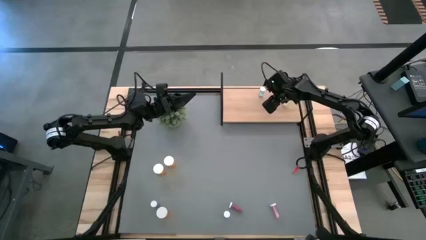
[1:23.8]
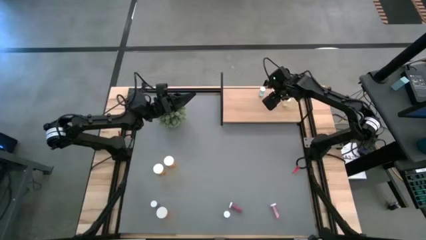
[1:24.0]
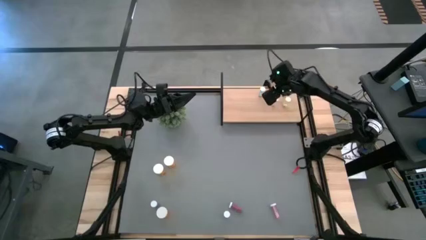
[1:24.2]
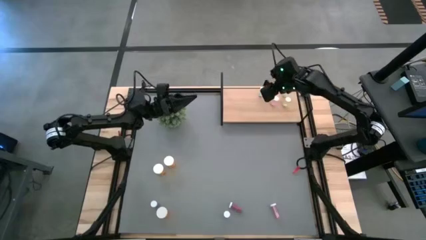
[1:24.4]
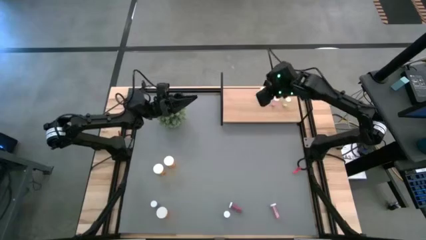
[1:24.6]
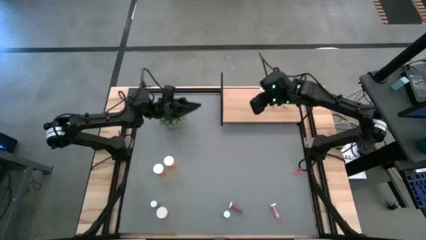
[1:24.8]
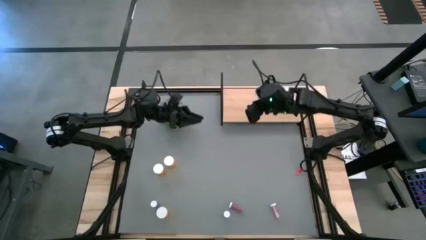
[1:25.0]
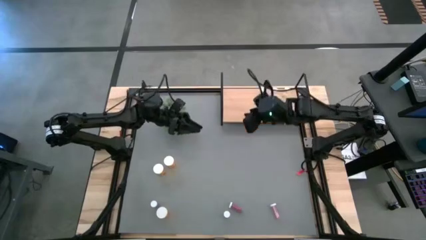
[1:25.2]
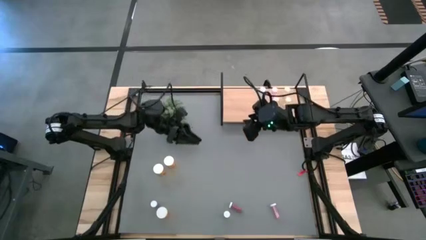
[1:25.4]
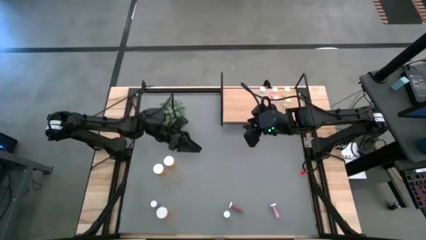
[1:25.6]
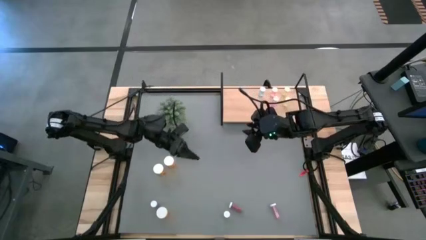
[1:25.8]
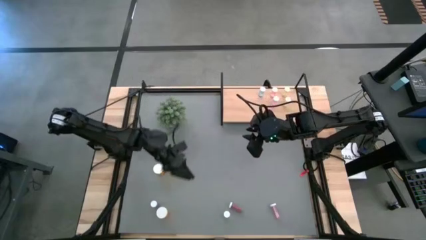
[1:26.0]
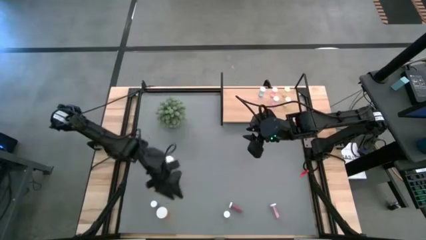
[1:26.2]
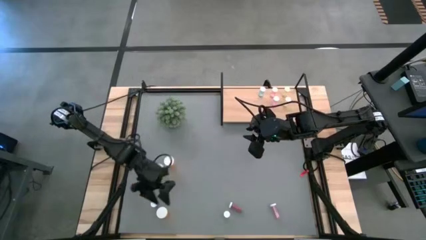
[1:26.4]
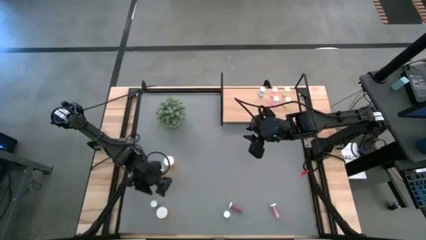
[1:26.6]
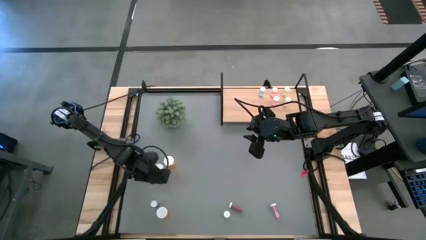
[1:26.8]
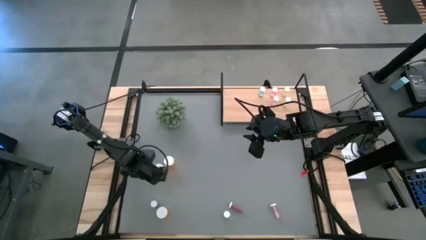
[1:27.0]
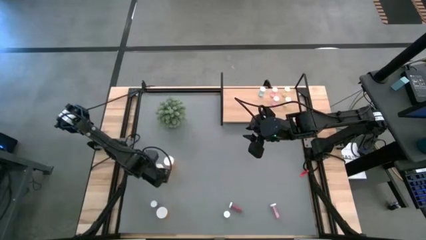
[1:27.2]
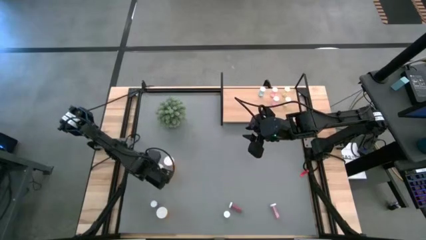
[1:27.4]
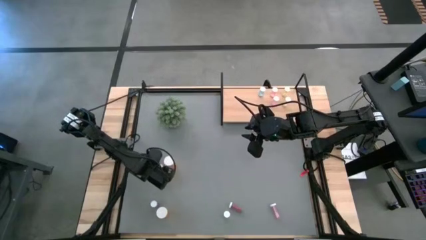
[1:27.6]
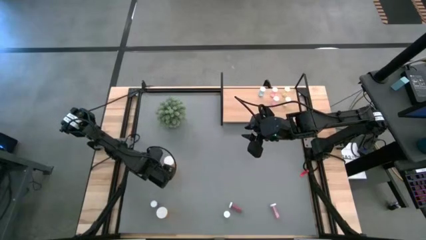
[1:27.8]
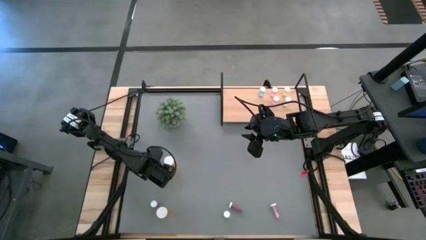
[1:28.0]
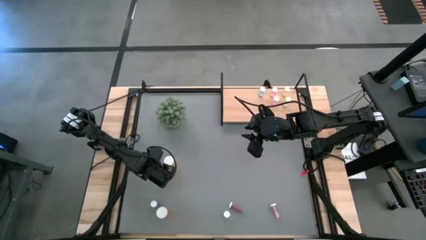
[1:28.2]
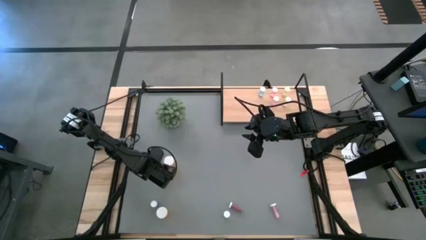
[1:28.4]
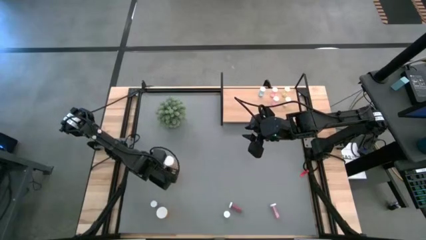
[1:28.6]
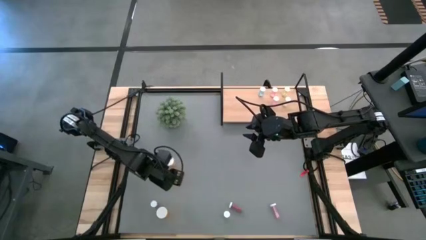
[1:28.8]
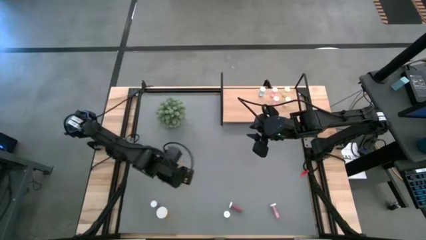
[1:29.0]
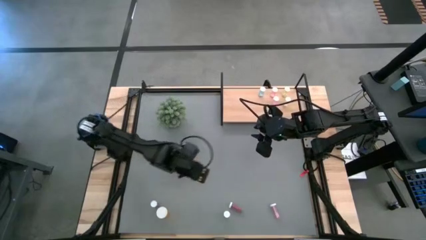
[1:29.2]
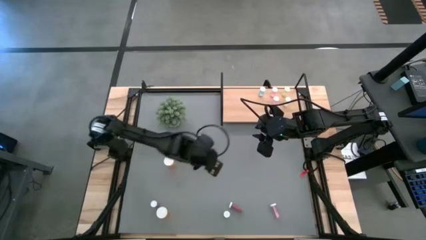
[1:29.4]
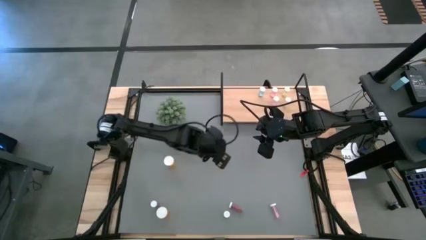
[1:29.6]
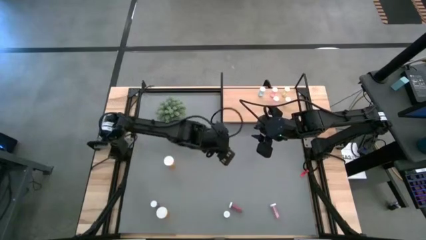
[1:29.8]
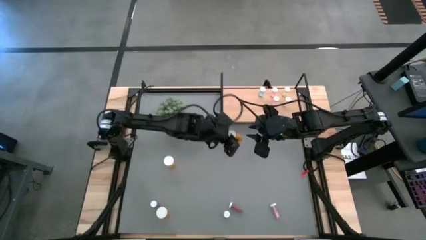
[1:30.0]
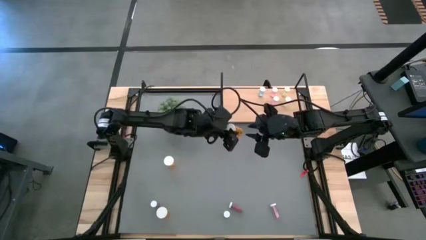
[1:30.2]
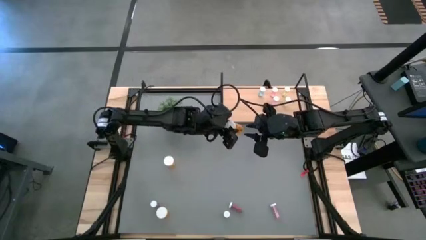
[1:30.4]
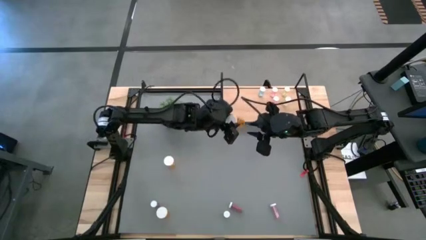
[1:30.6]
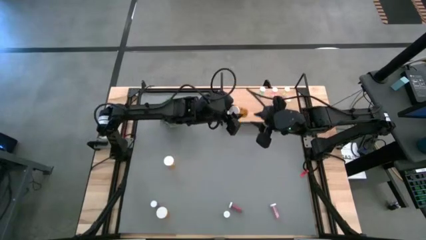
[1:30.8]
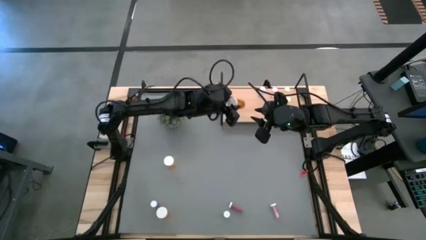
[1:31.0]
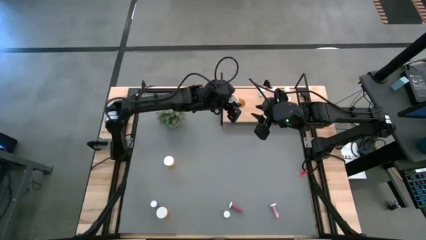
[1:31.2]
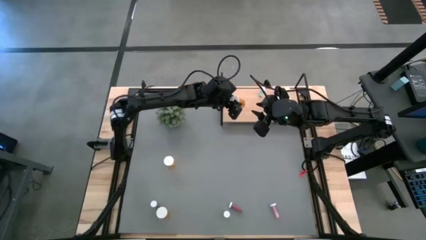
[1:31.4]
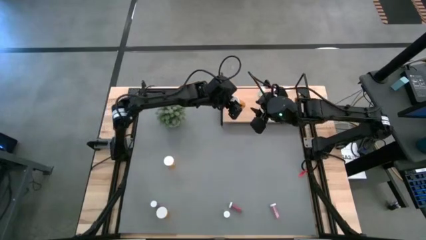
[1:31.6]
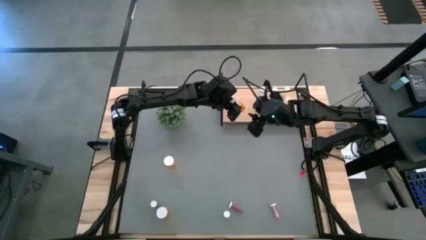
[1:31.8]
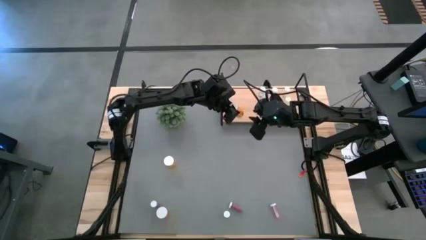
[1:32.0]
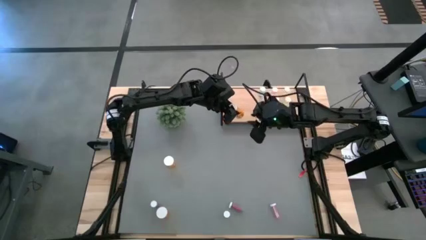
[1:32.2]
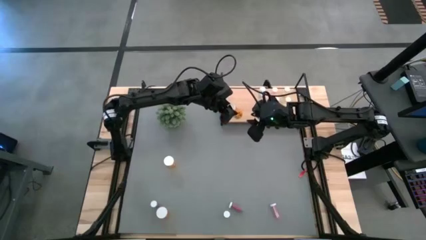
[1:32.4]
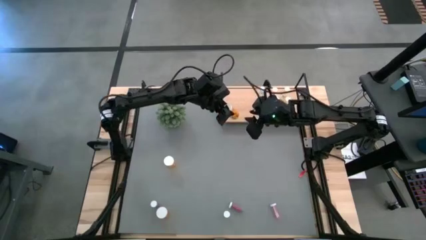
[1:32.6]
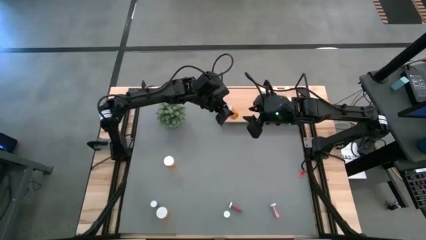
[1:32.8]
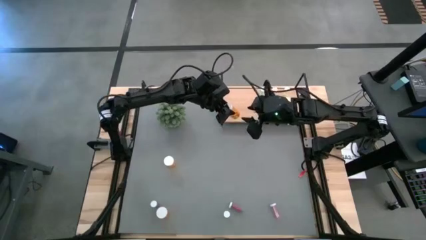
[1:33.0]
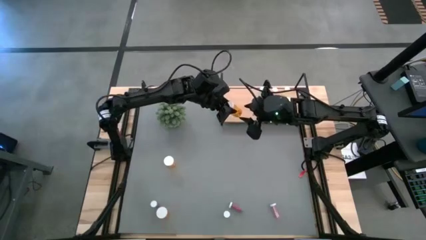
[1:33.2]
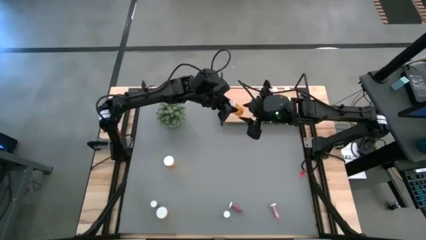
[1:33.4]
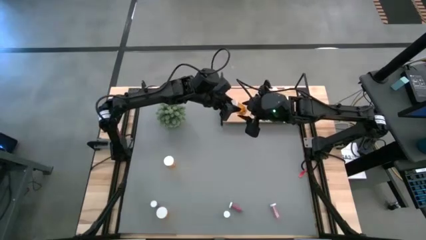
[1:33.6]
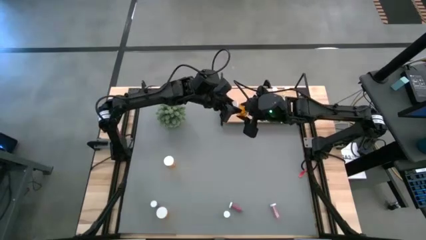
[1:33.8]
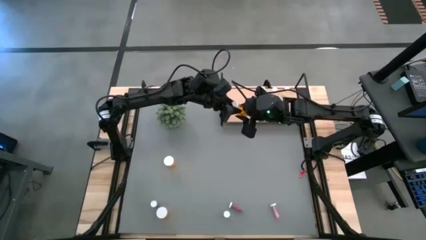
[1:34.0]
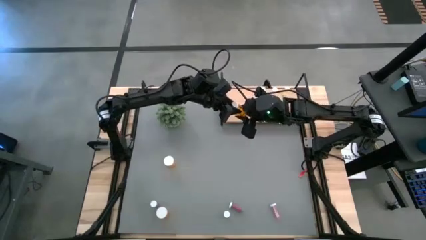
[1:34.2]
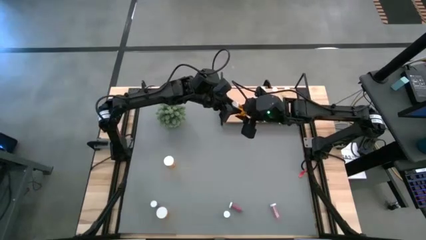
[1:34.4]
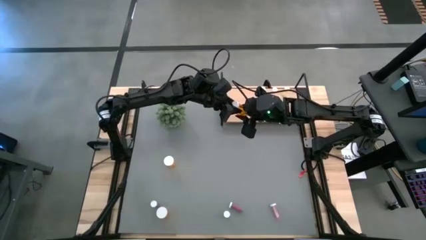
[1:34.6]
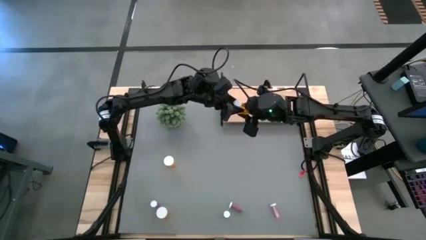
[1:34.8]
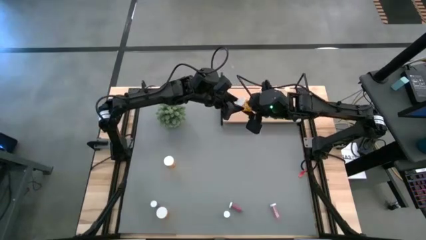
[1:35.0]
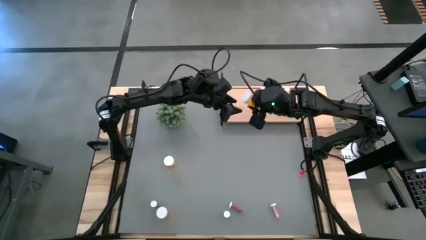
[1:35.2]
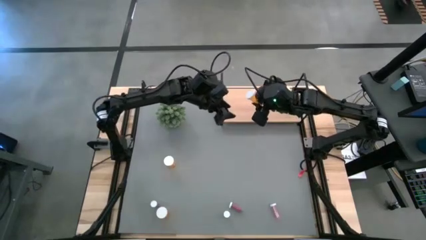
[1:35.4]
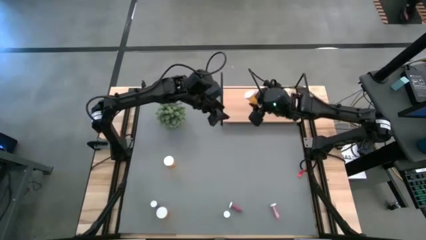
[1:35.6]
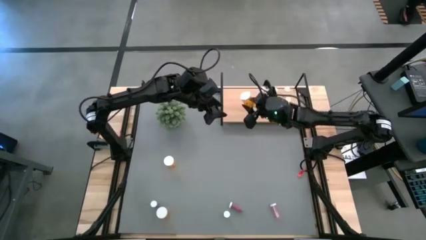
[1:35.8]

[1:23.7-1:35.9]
Task: Pick and place medicine bottles onto shelf by color
Put the top left orange pill bottle on the shelf
